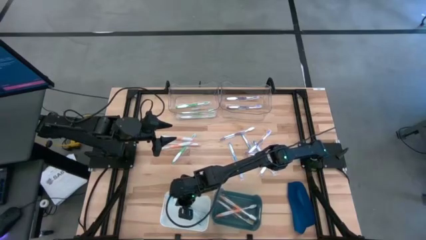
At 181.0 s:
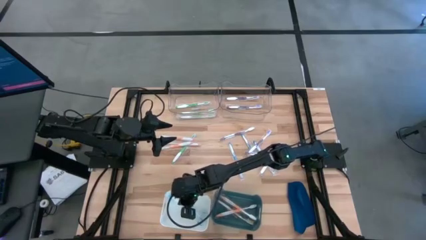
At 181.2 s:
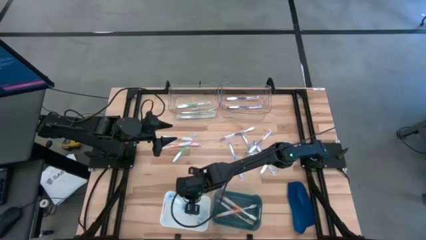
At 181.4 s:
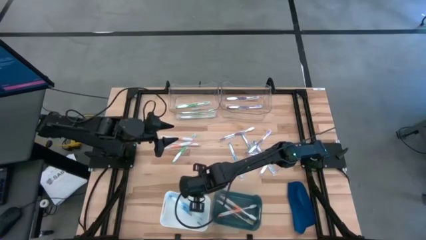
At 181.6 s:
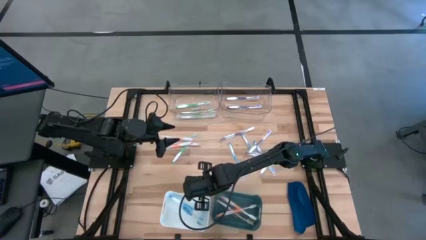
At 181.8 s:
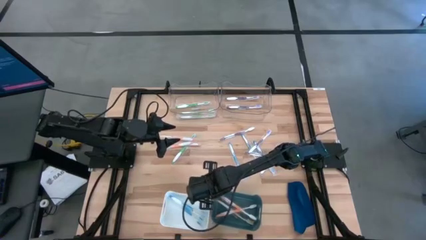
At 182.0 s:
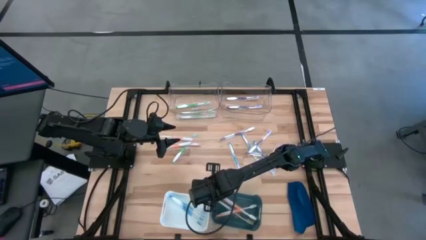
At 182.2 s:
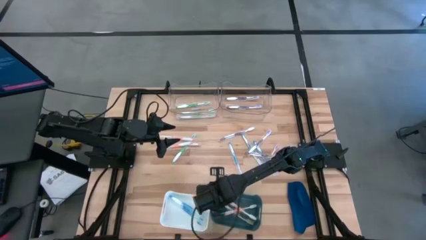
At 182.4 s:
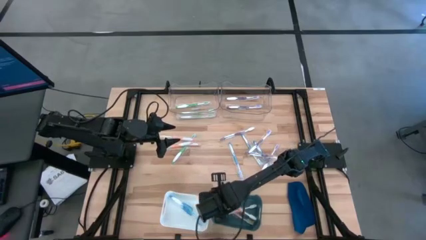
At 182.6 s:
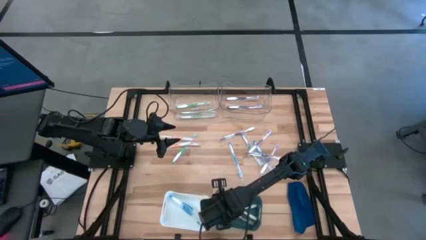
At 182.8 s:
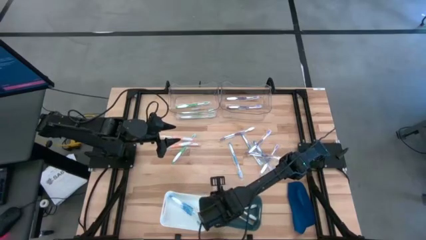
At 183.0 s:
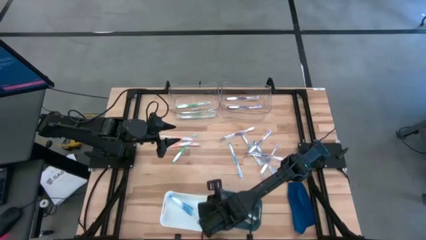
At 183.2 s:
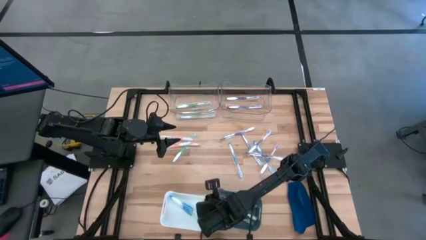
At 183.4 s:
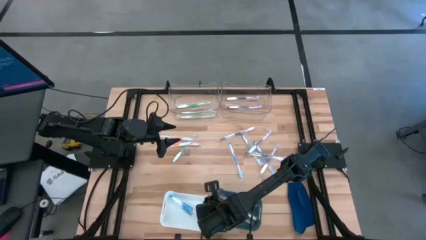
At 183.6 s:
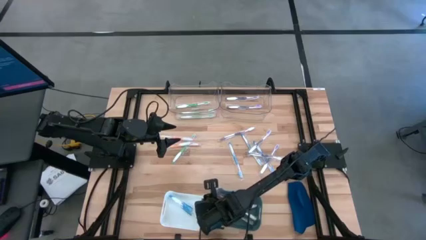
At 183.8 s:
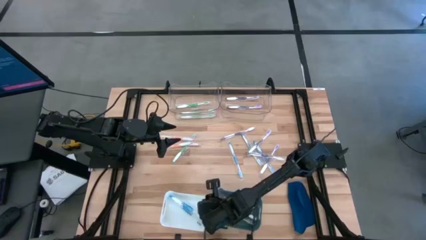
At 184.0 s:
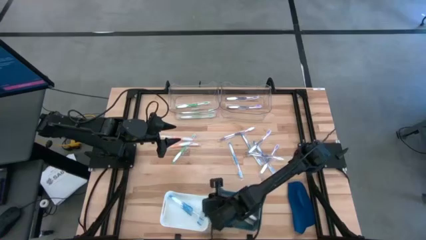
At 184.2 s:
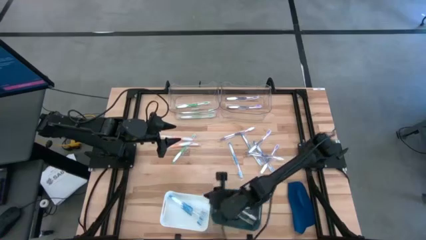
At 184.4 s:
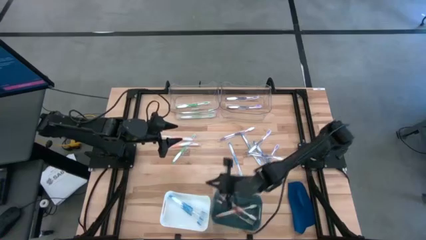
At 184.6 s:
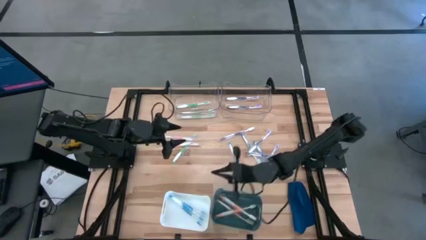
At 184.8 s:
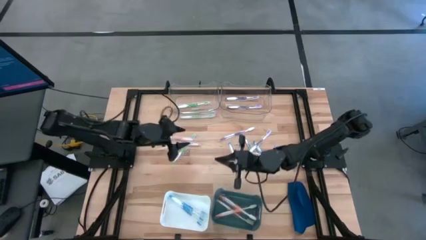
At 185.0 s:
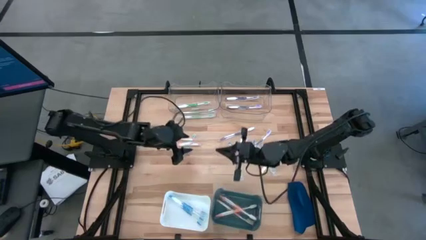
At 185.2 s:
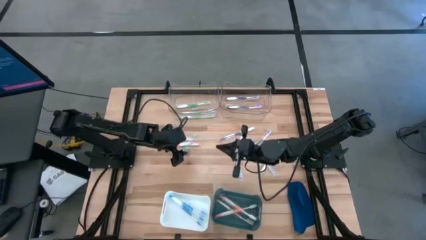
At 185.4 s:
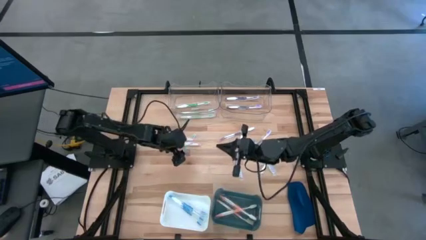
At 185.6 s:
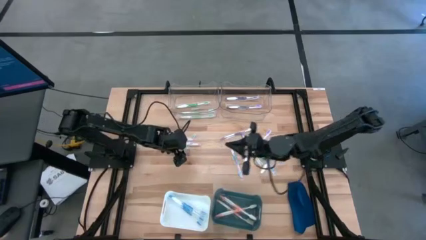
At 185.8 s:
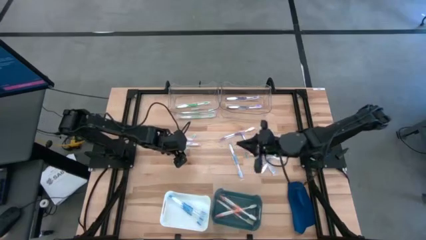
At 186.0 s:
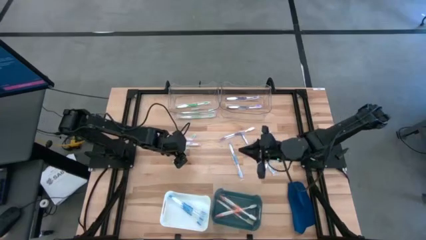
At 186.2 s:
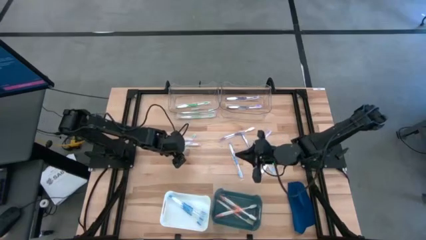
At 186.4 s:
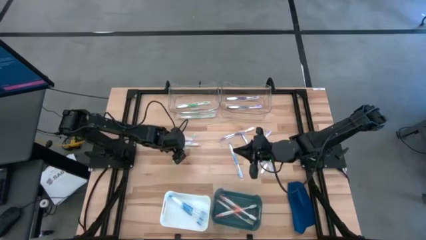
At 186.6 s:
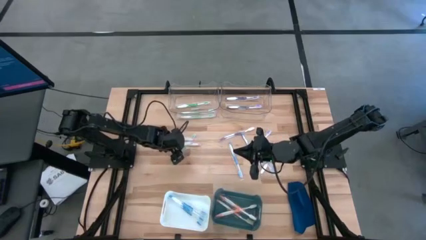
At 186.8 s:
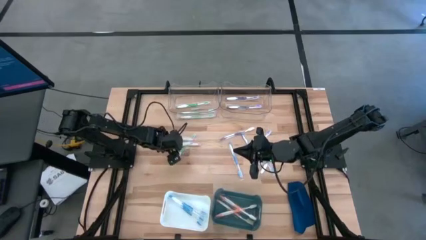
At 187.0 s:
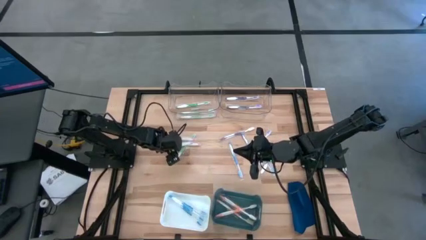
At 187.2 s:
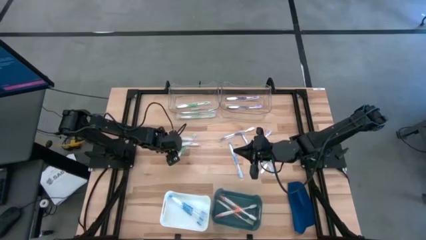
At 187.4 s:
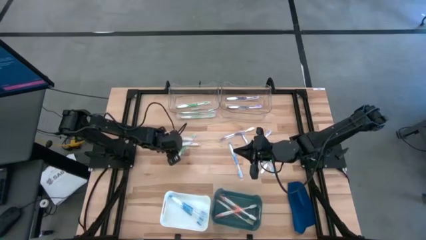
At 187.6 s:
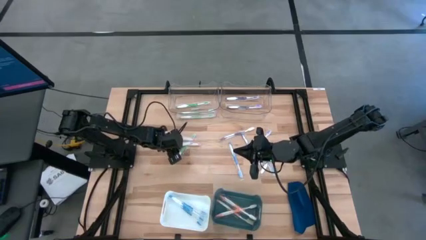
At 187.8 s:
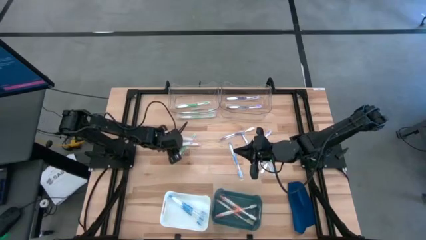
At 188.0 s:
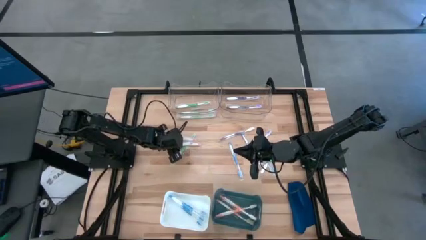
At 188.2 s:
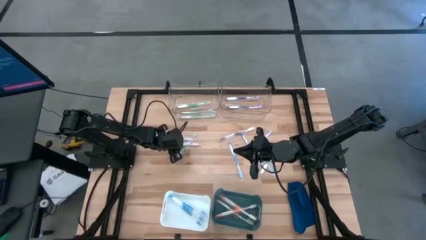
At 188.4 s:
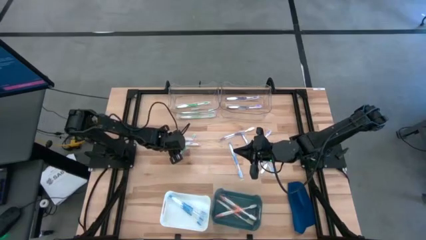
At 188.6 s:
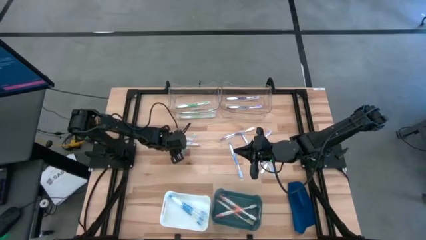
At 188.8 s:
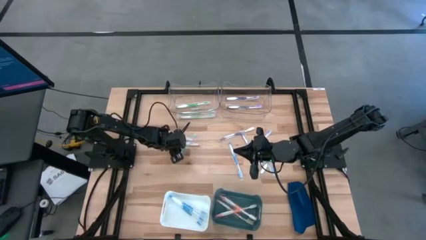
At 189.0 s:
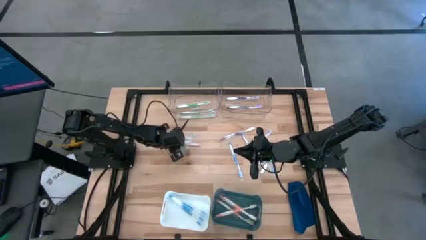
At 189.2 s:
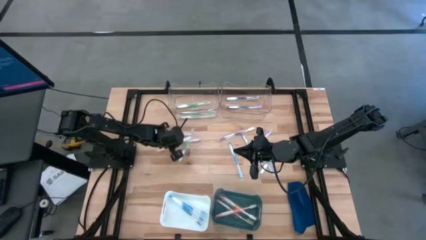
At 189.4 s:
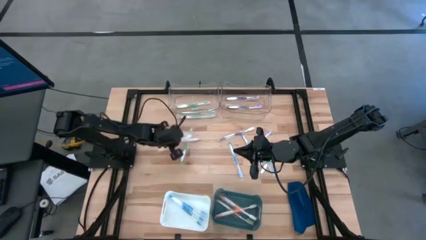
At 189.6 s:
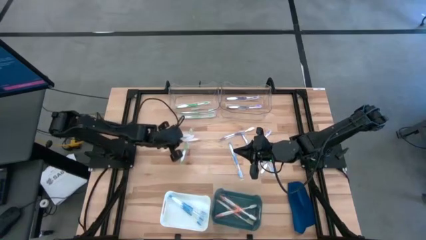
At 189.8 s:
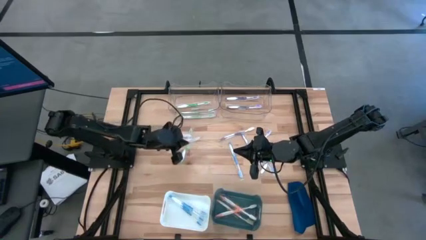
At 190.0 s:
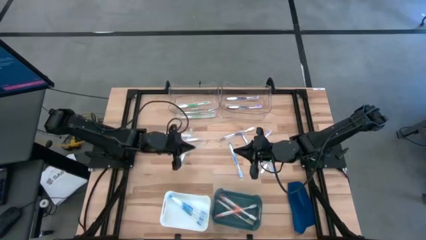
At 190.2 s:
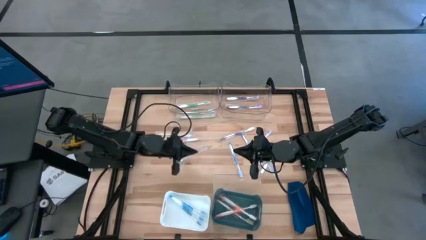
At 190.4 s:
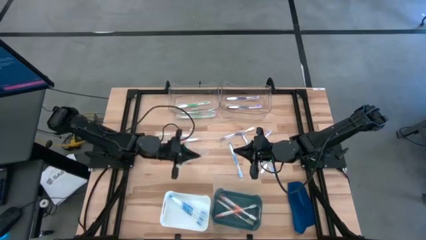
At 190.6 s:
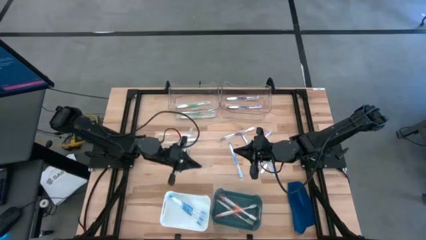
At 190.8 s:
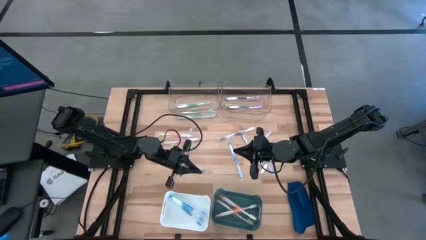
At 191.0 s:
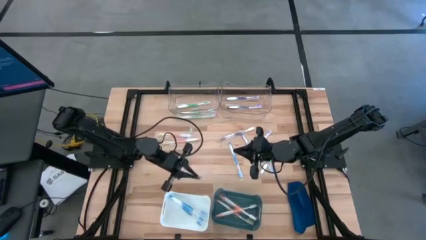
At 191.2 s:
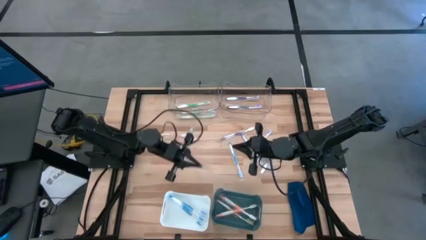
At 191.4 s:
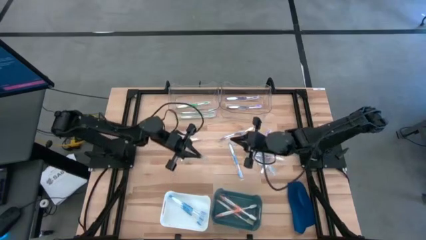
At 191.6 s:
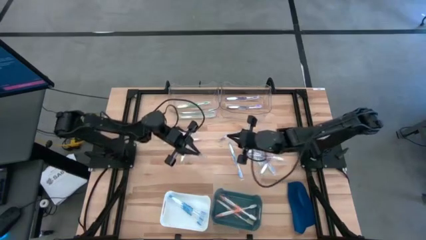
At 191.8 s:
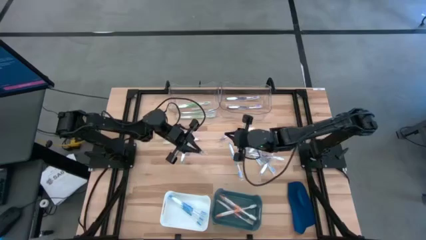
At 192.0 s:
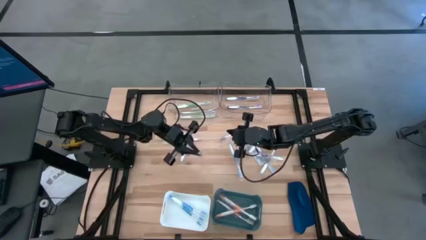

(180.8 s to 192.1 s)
Task: Pick & Place Toothbrushes
Put the orange toothbrush into the green bin

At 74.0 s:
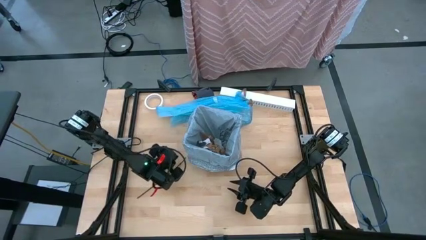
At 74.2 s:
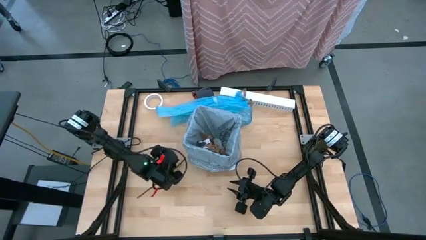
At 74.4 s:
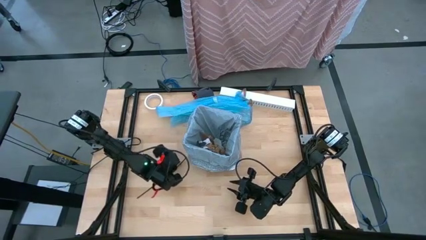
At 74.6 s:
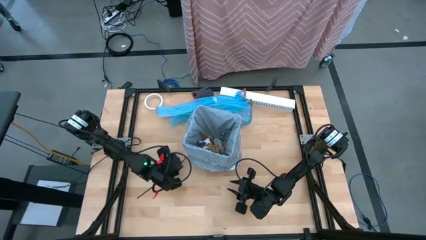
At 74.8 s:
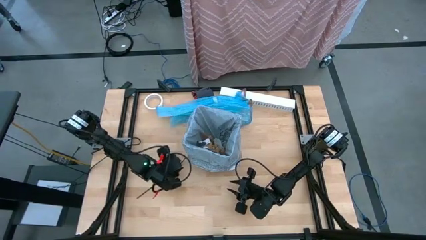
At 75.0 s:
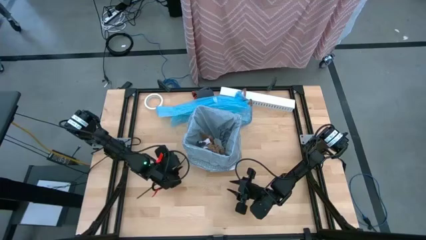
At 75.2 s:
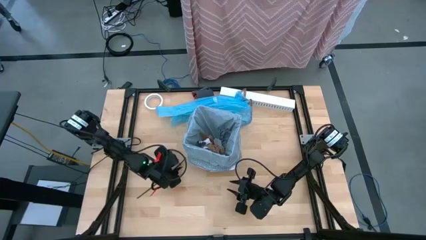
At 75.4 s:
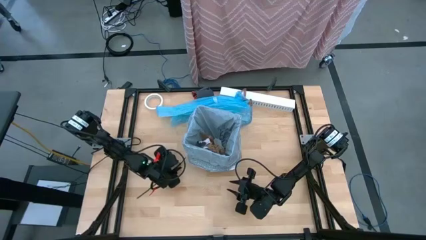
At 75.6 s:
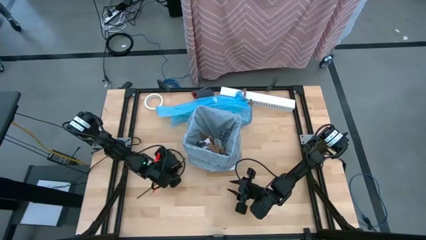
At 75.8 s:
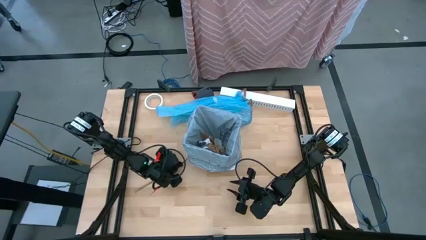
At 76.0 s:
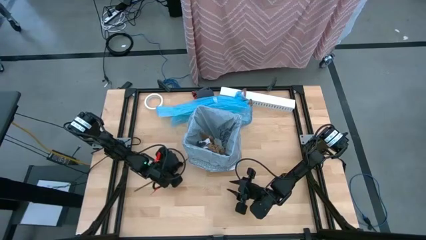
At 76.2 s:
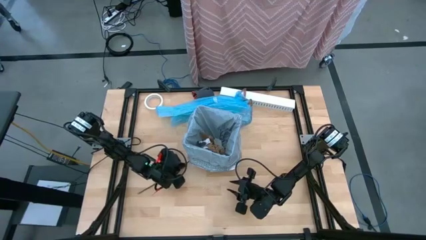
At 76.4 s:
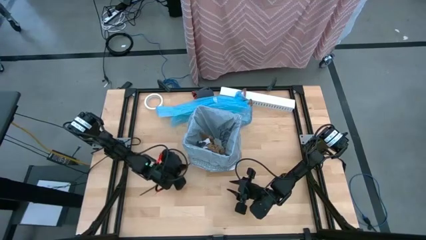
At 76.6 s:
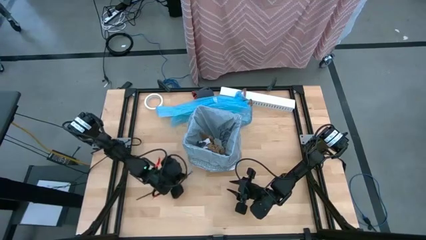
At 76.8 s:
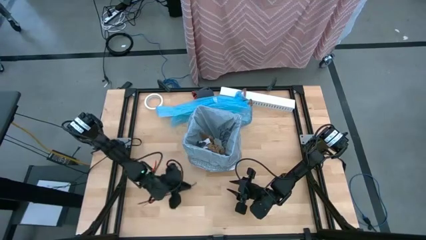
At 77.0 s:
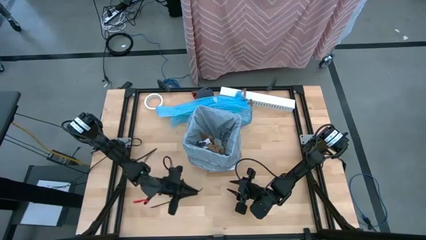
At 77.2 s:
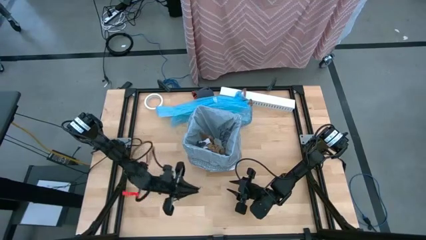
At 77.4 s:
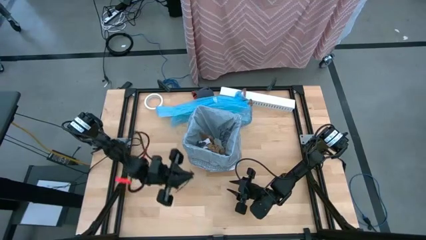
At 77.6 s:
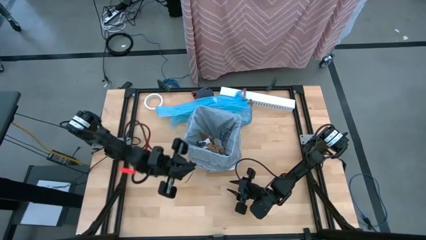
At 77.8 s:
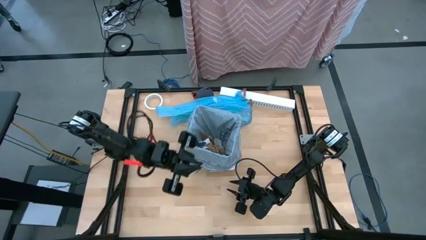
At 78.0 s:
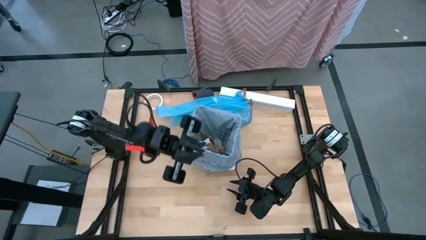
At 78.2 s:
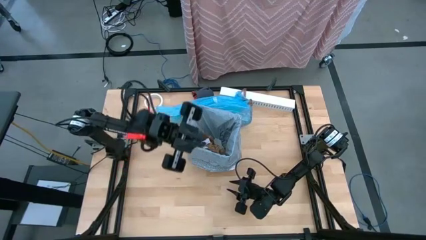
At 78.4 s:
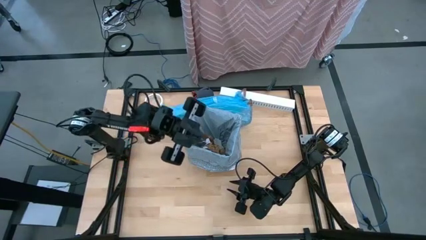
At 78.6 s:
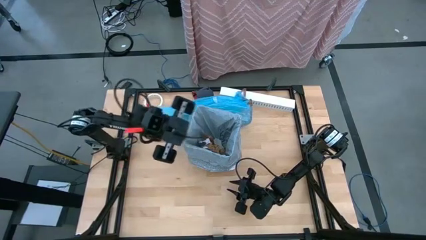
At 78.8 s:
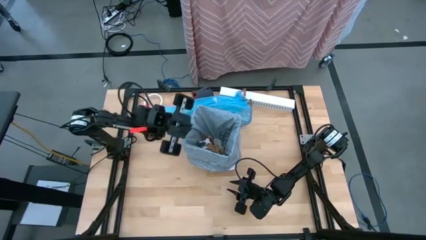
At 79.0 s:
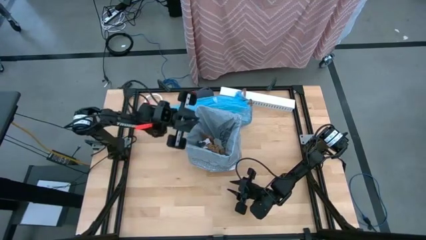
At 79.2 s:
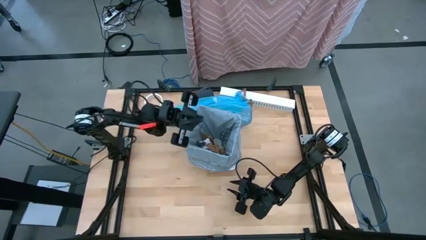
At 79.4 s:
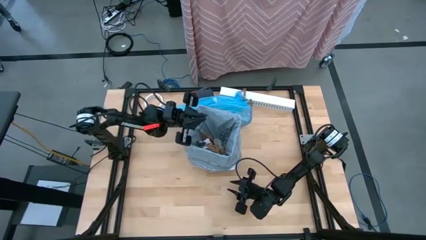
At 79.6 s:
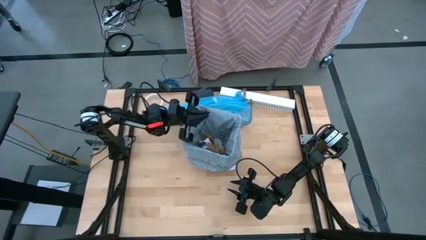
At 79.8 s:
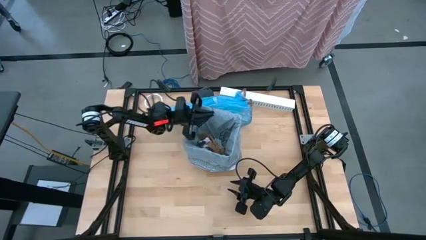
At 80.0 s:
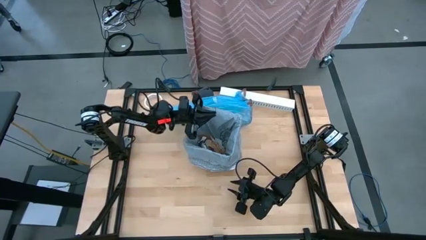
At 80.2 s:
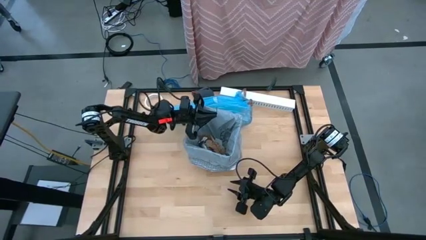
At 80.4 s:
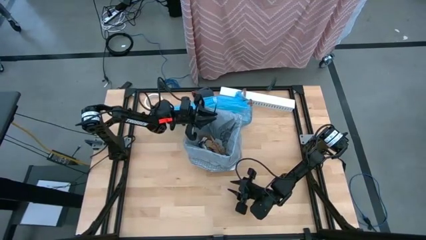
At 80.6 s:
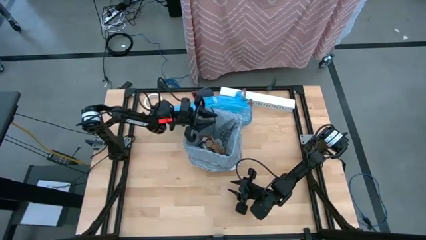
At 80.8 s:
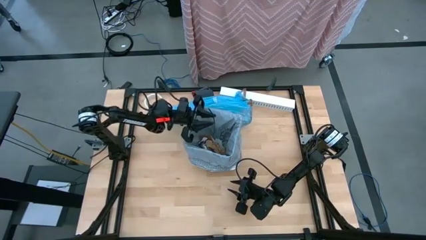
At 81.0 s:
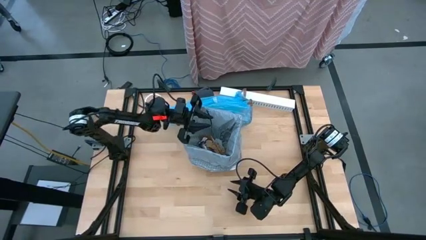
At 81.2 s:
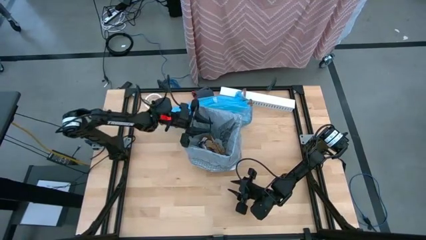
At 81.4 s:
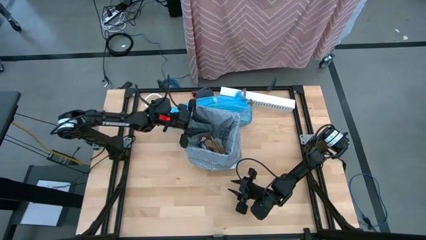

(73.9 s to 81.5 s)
Task: place trash/remove bag and relplace
Put the black zip tie inside the black trash bin
